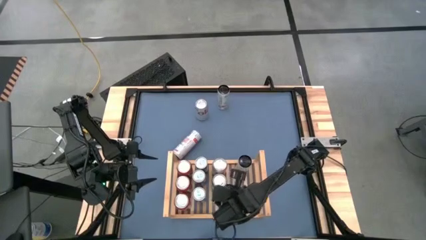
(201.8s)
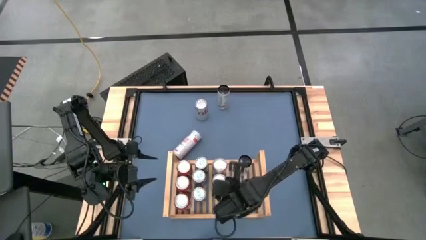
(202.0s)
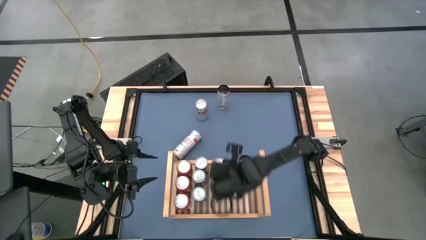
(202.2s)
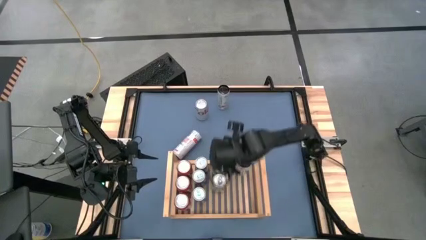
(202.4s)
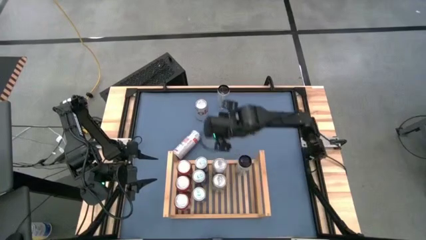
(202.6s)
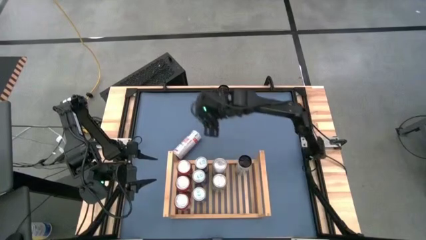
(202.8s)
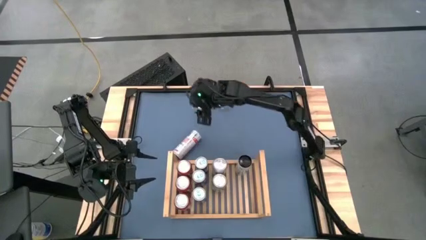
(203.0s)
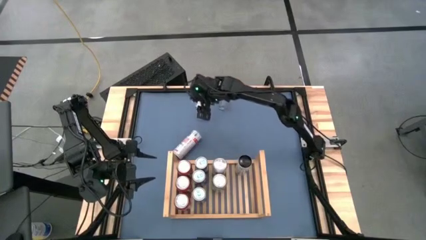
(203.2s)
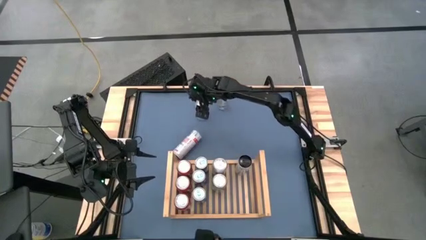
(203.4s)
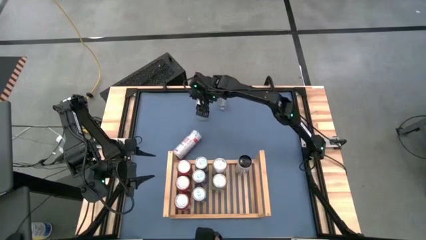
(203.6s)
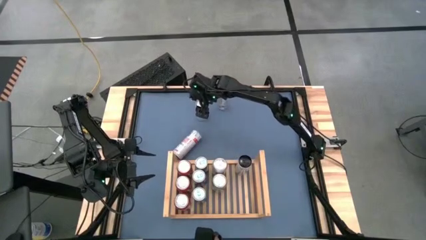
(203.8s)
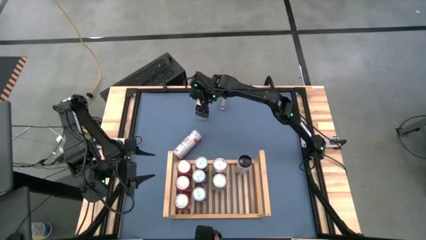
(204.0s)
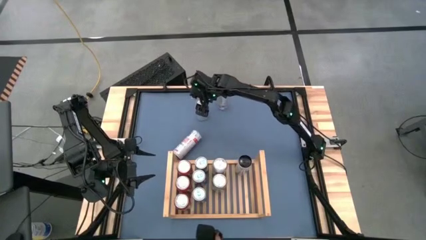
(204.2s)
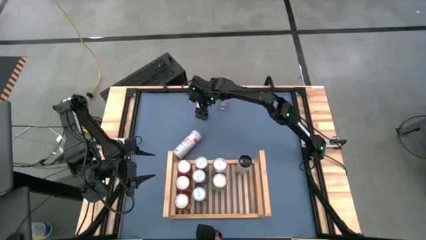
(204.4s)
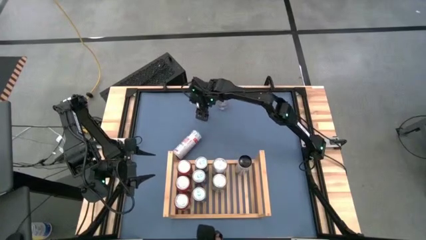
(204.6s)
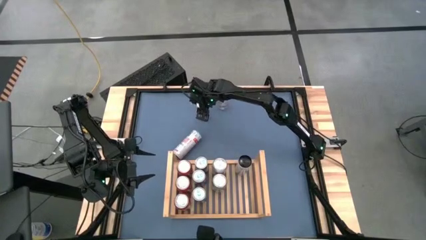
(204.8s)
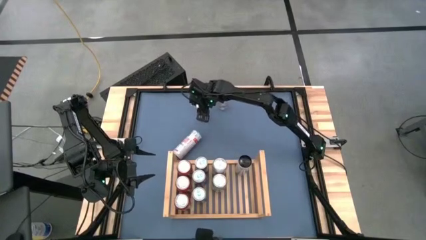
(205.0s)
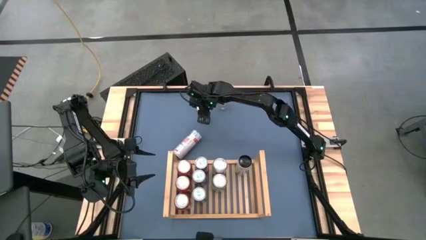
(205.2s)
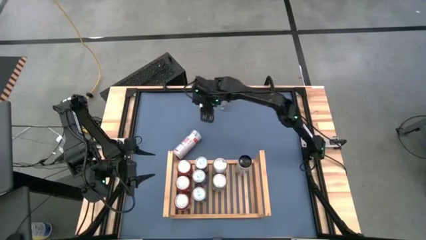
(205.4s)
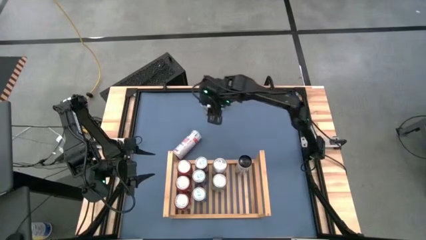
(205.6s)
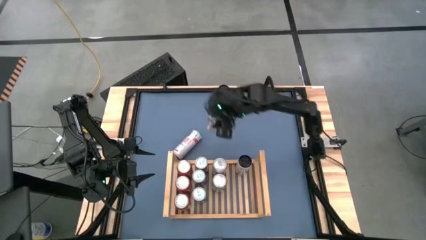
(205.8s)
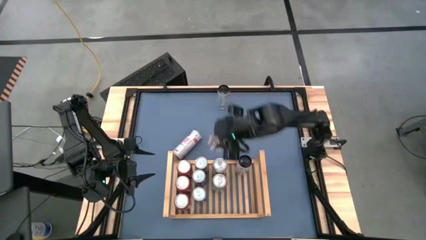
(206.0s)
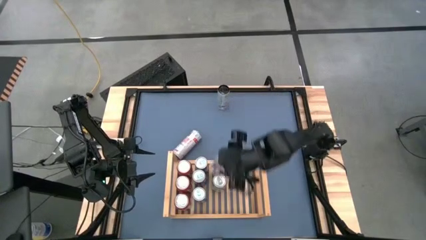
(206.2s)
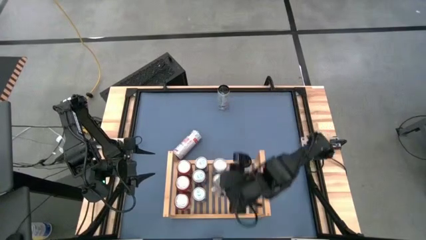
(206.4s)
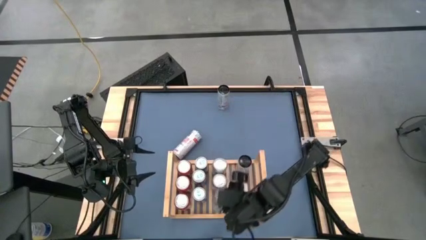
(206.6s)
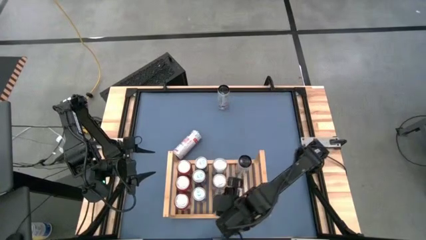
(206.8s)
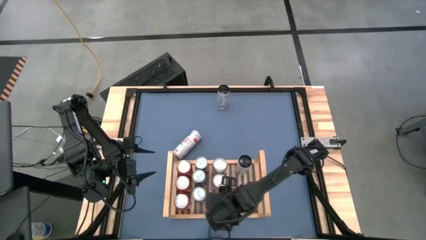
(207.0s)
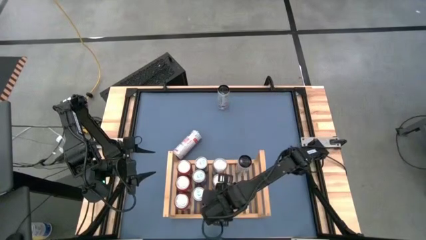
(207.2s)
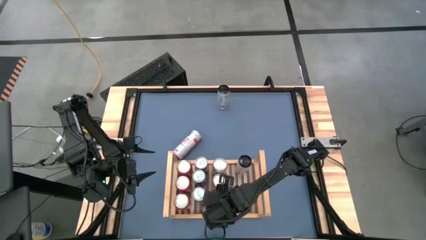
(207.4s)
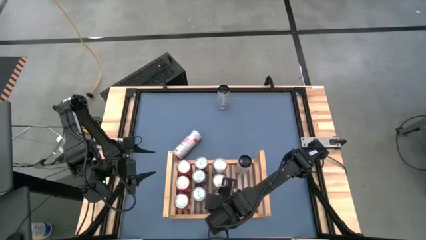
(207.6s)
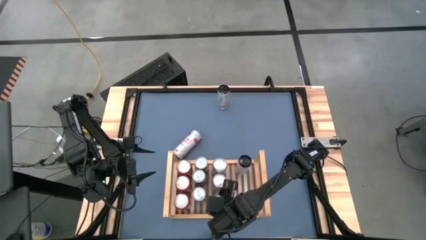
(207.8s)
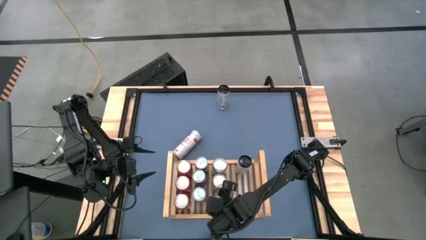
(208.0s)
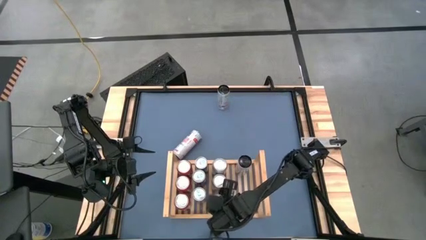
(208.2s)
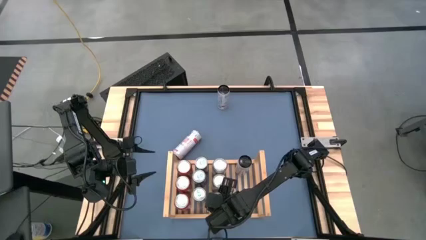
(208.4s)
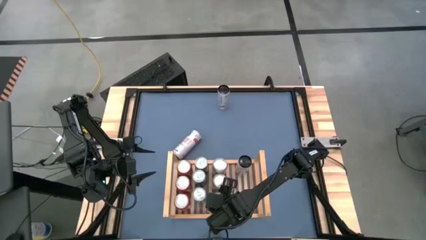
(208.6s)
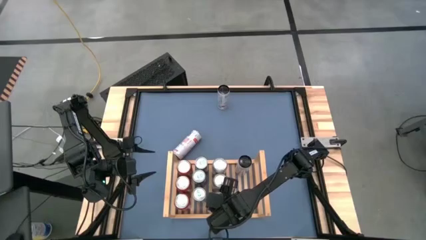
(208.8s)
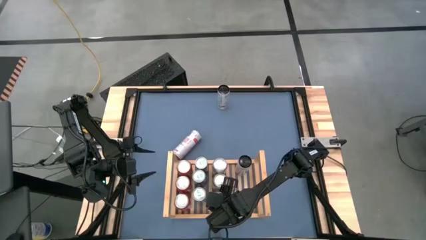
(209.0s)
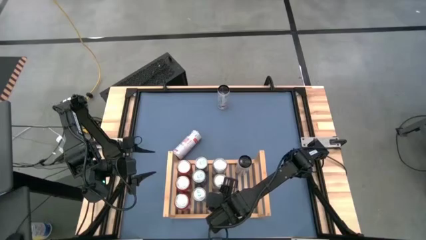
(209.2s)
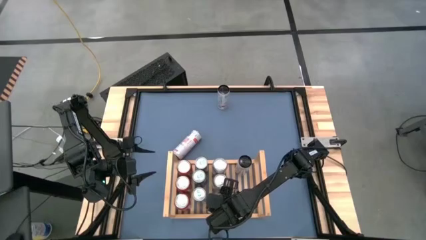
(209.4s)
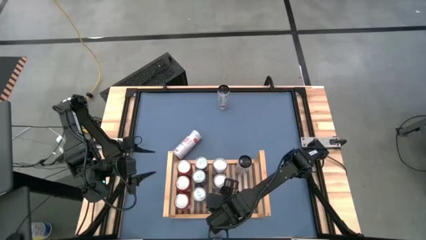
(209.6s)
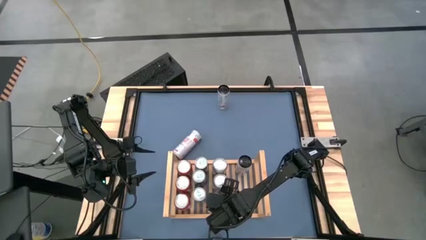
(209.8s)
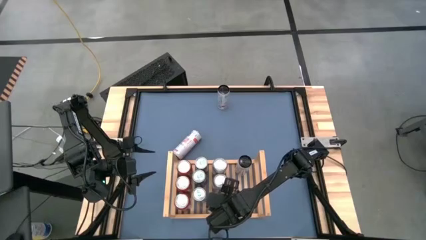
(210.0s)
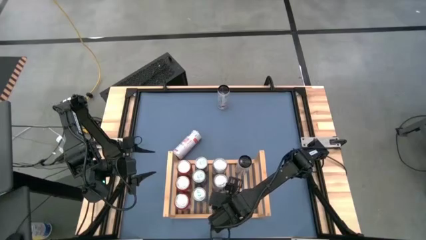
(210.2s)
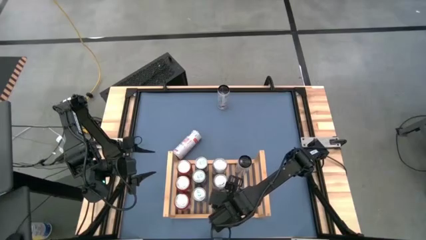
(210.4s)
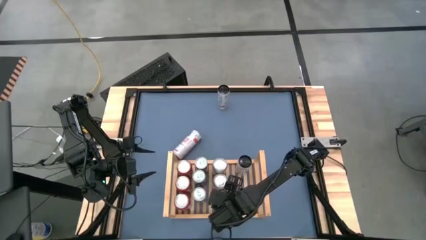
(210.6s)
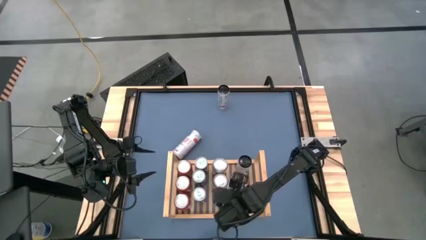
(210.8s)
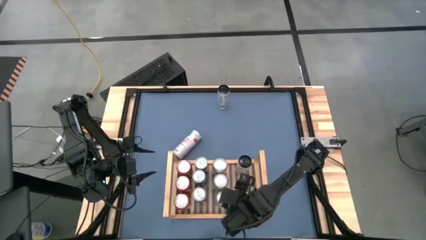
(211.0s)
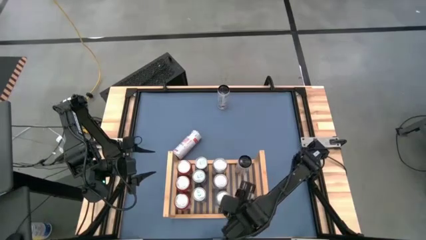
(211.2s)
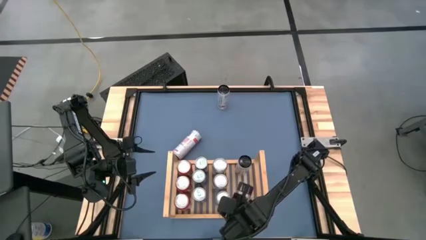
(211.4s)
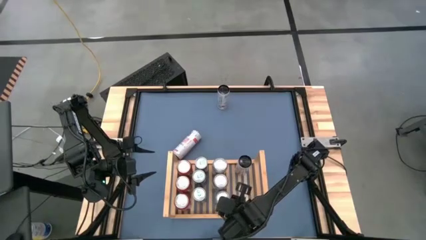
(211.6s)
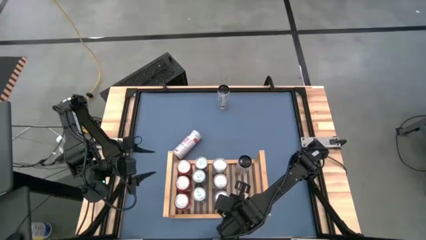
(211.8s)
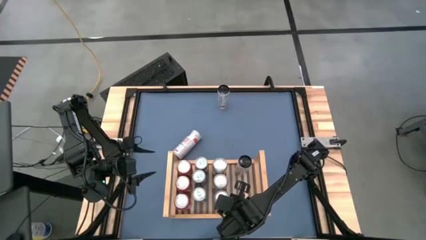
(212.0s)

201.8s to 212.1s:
Task: Place canned beverage on shelf
Put the white-pink soda can on the shelf aligned with the other white-pink
